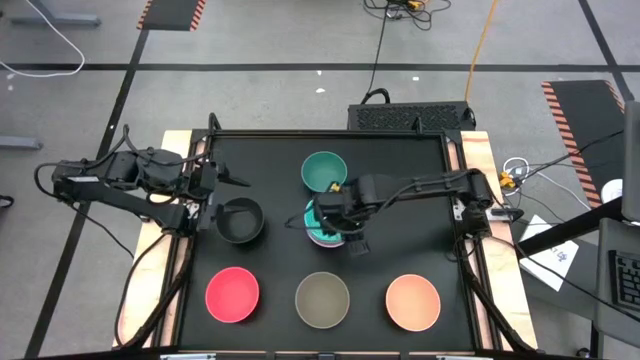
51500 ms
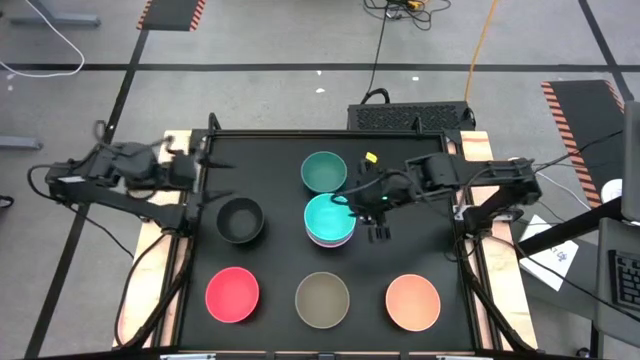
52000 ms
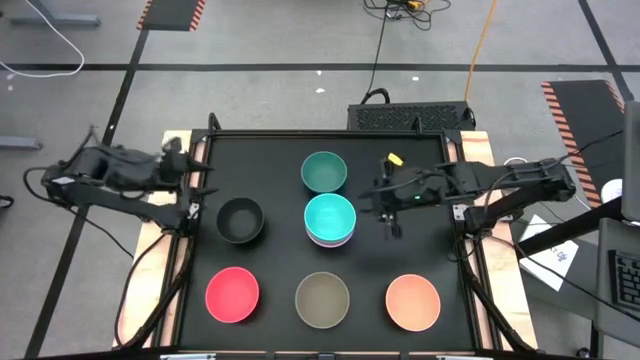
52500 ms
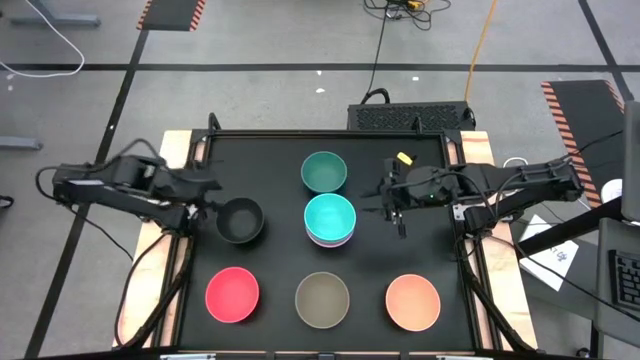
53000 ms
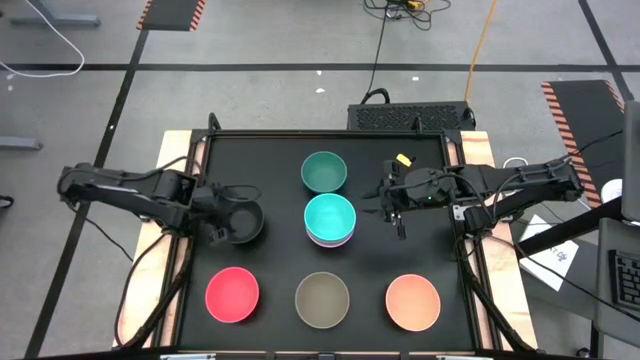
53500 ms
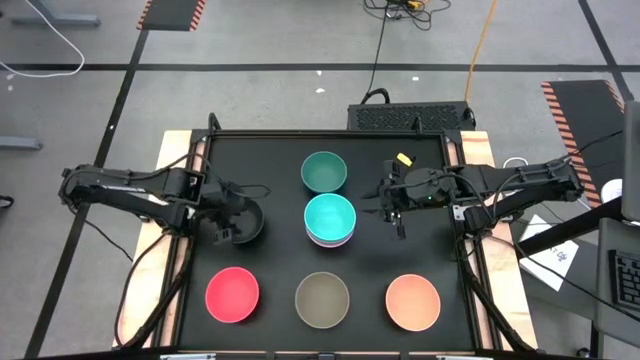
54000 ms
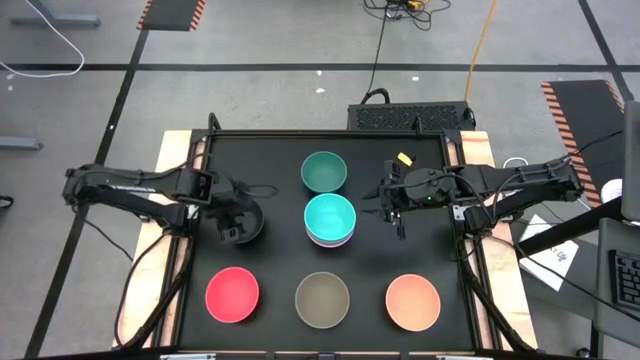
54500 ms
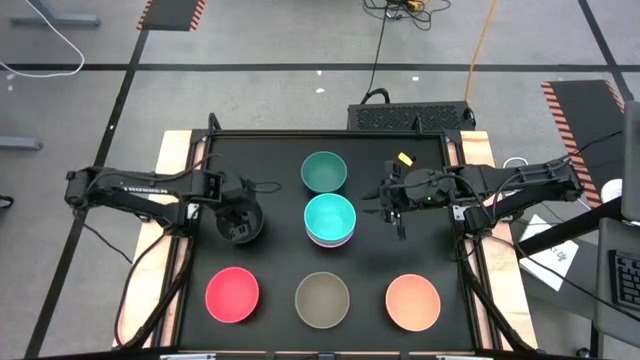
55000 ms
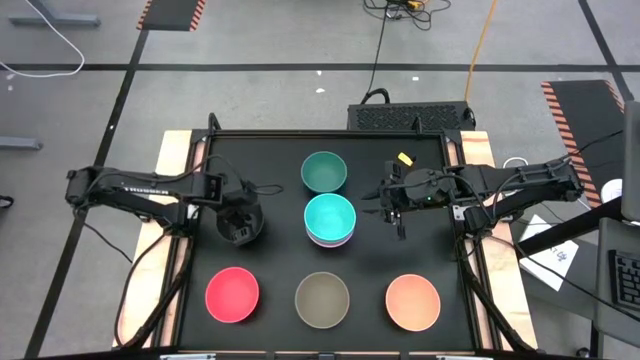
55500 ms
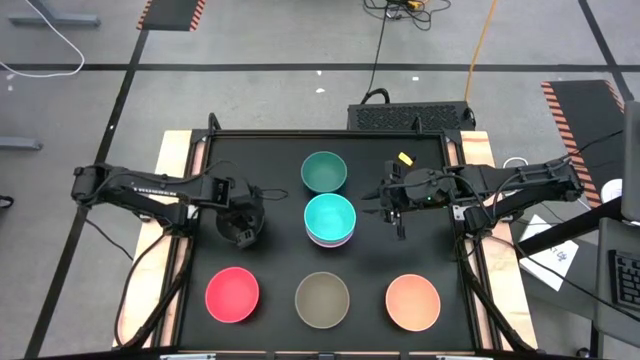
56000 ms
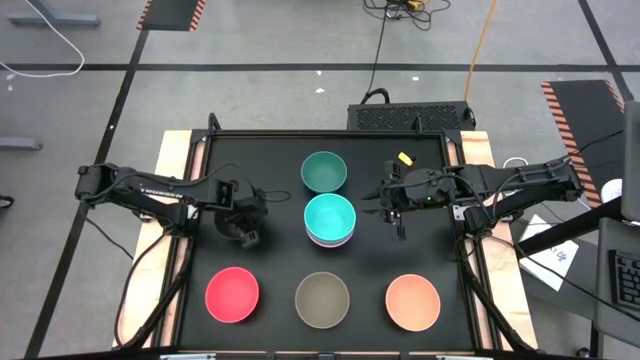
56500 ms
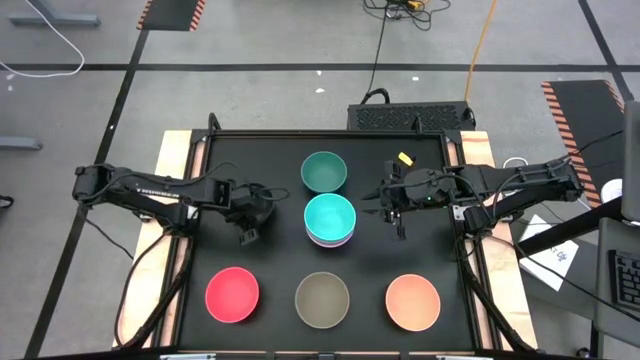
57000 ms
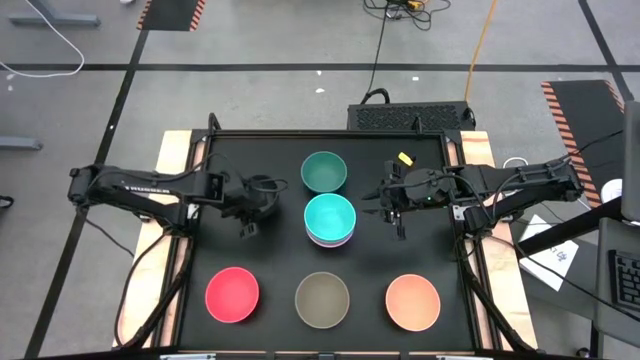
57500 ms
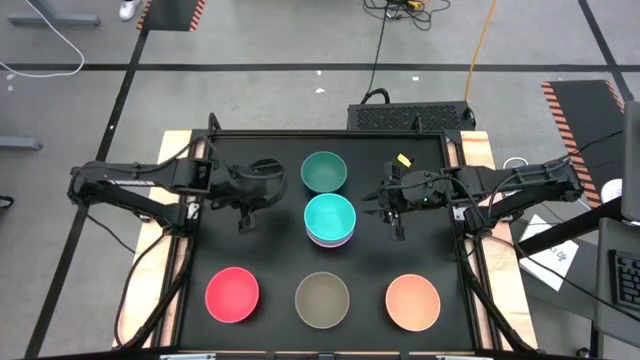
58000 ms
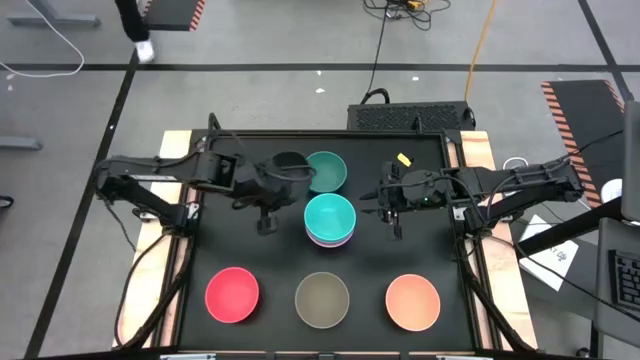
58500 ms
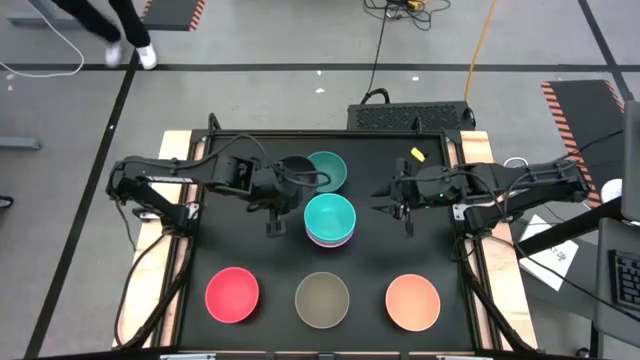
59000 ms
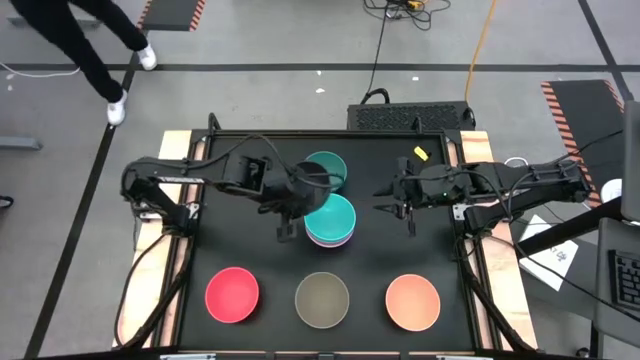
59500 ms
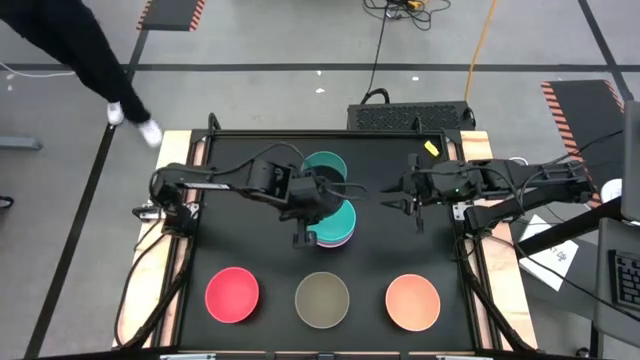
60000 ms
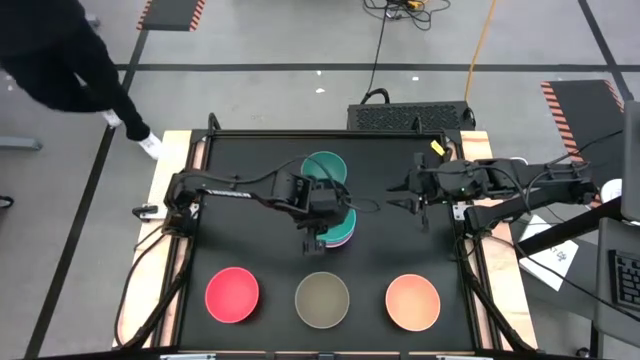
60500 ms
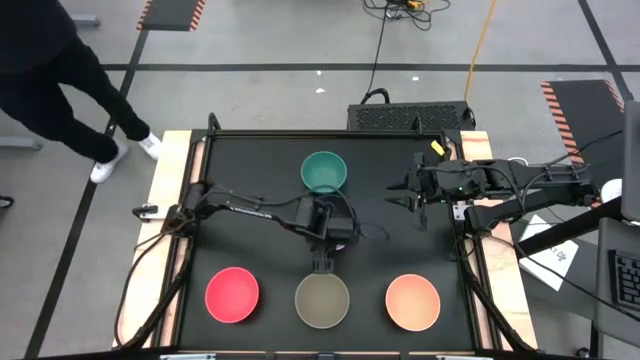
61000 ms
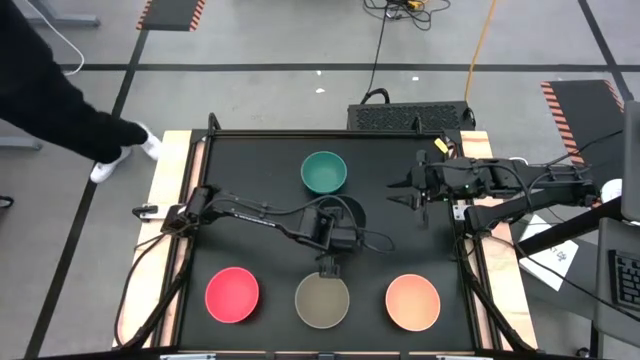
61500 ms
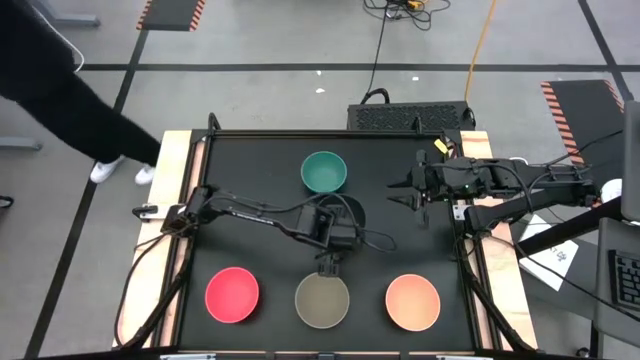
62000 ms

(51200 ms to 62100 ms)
Task: Nest bowls inside each other
Stack the black bowl on top of the light green bowl

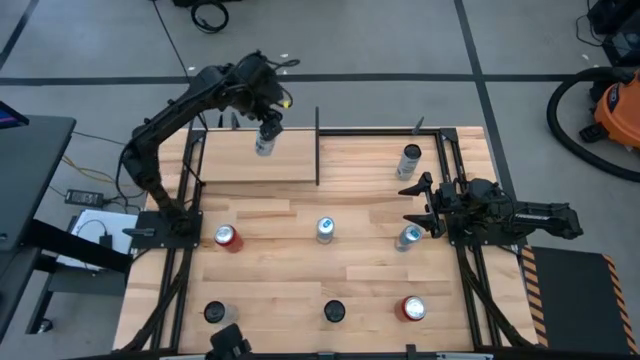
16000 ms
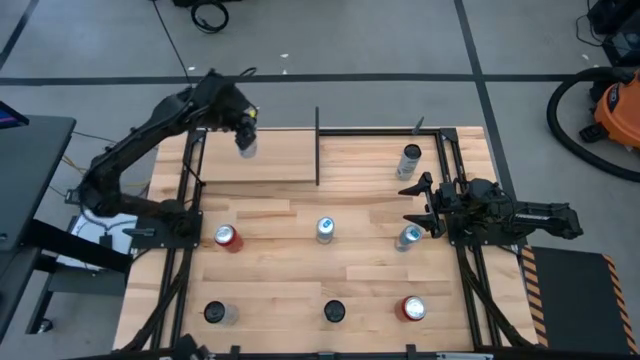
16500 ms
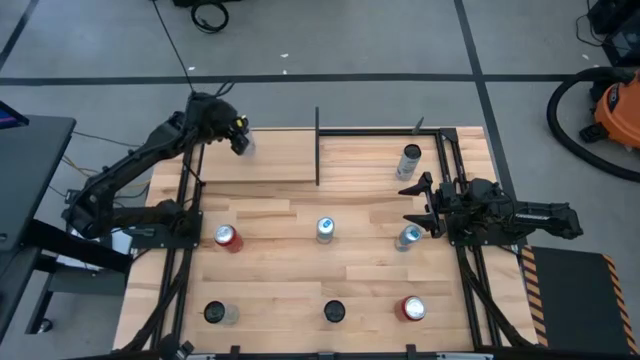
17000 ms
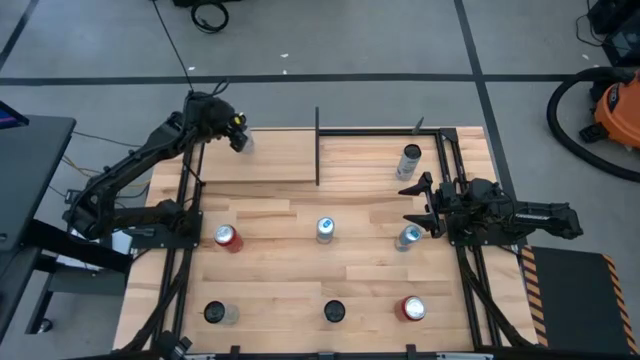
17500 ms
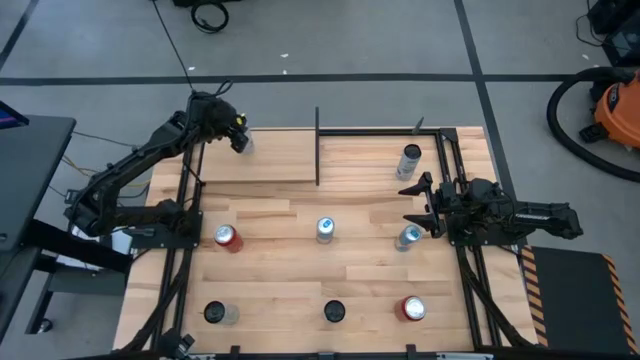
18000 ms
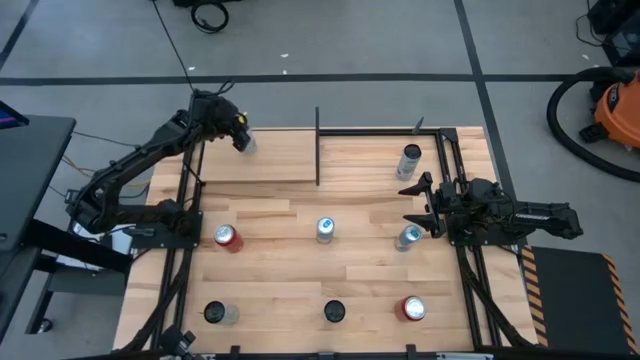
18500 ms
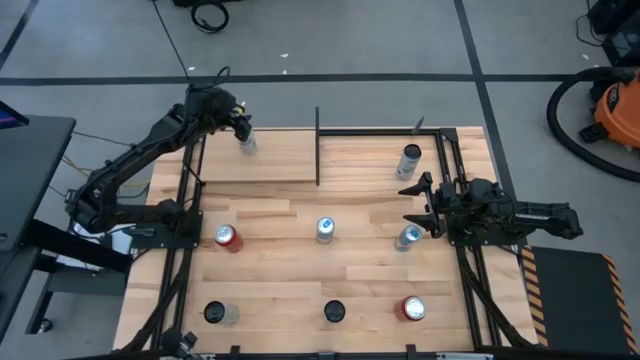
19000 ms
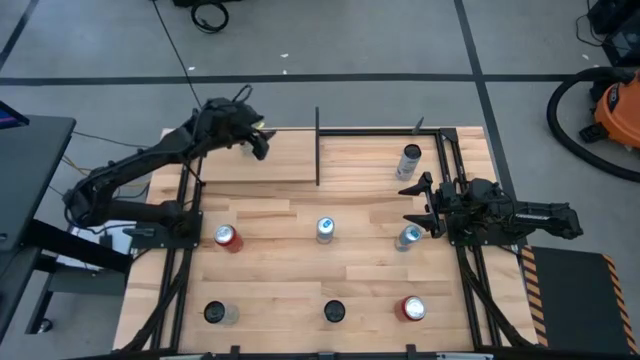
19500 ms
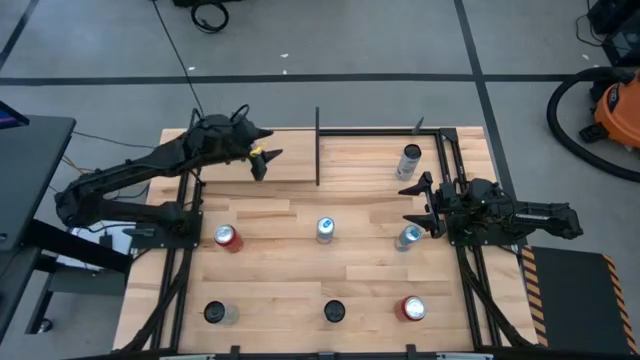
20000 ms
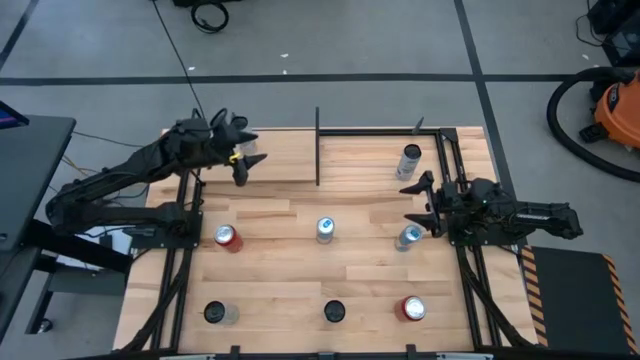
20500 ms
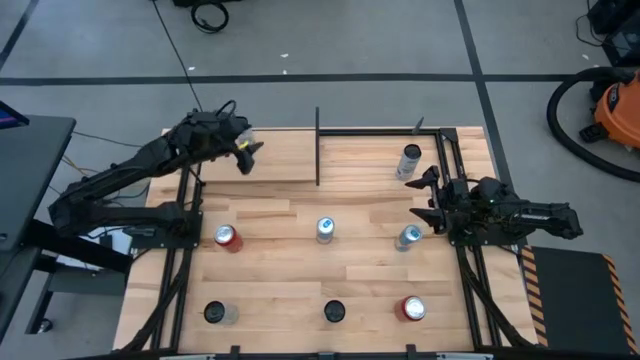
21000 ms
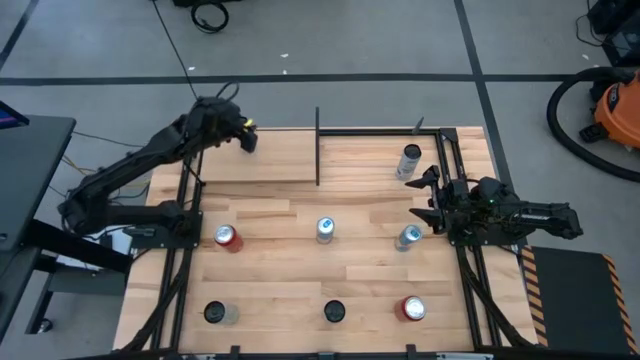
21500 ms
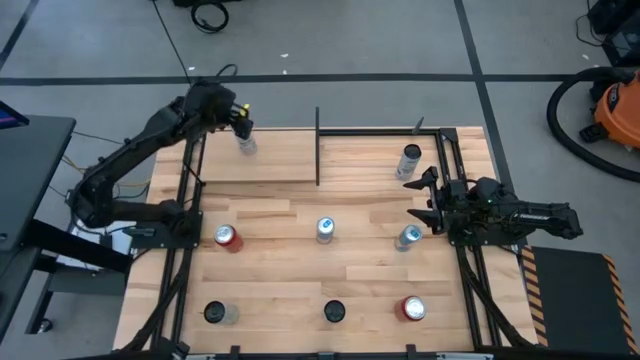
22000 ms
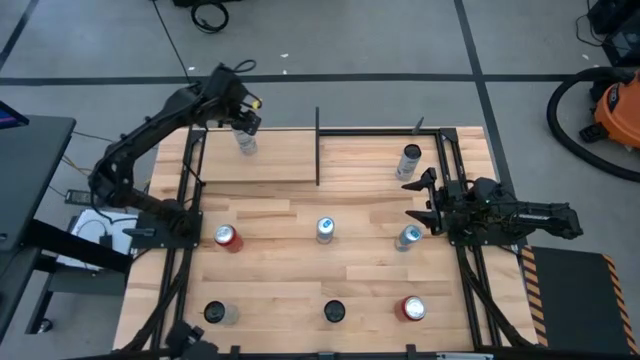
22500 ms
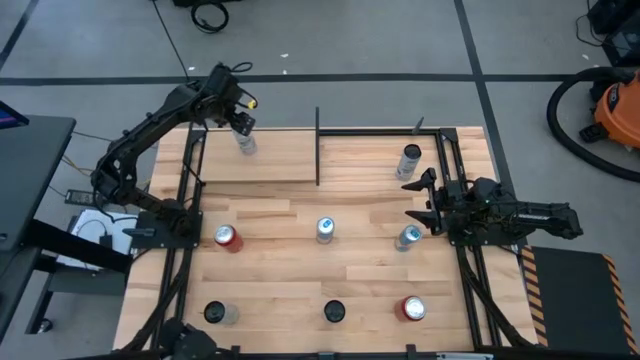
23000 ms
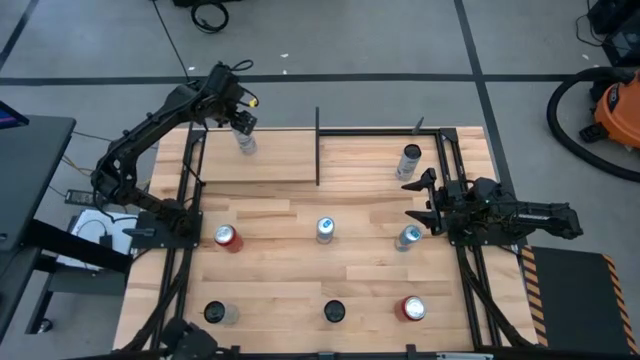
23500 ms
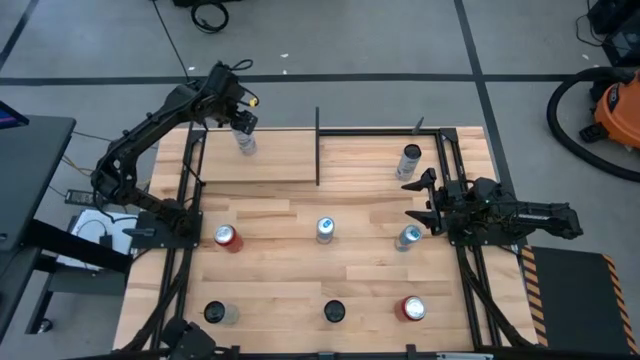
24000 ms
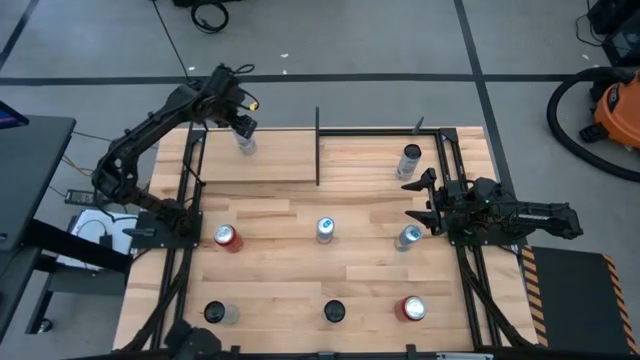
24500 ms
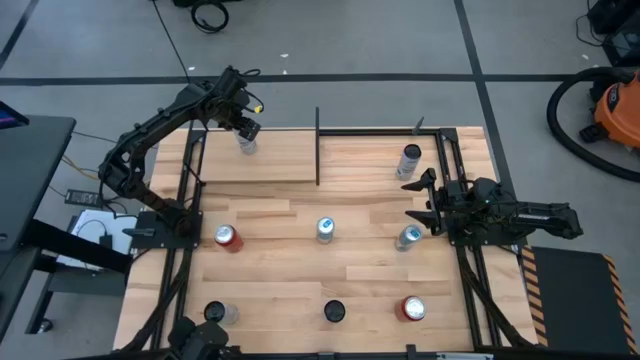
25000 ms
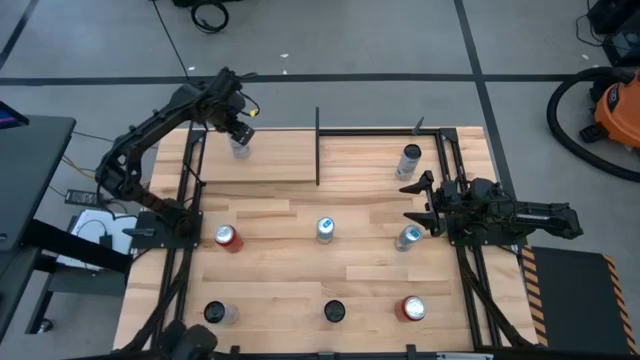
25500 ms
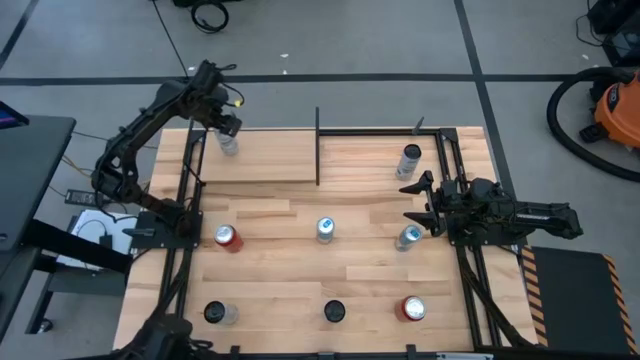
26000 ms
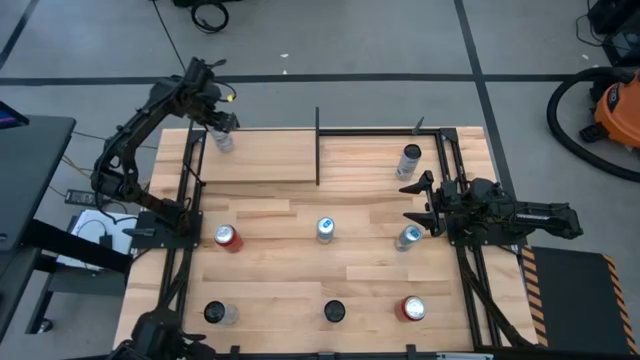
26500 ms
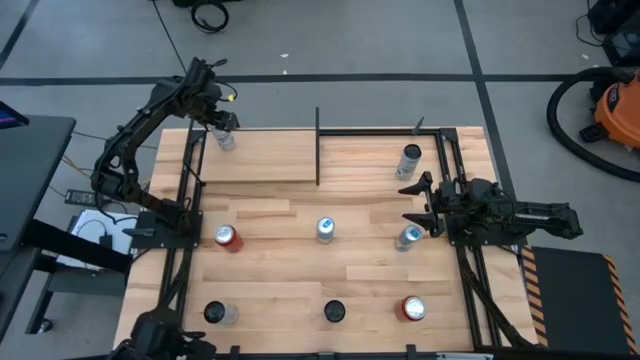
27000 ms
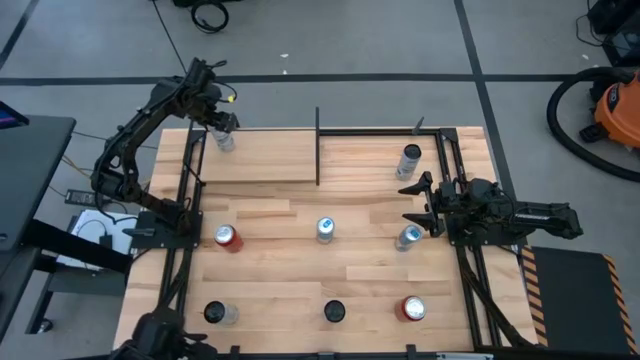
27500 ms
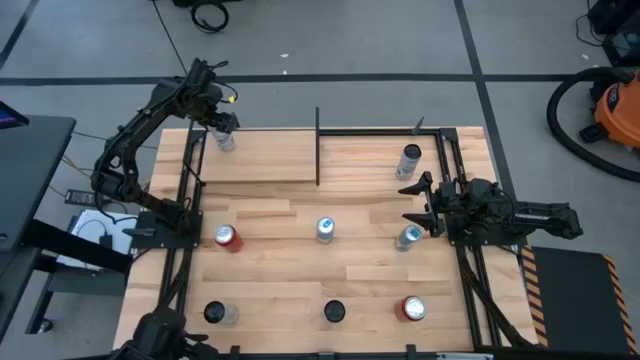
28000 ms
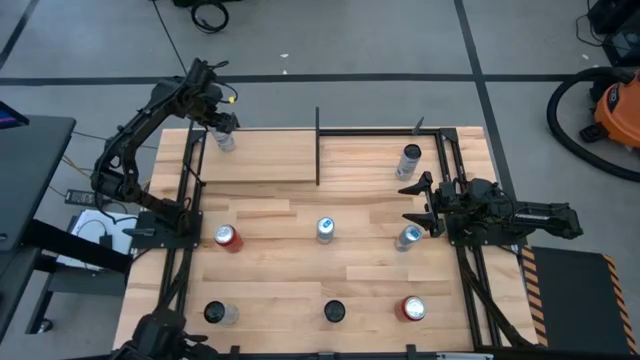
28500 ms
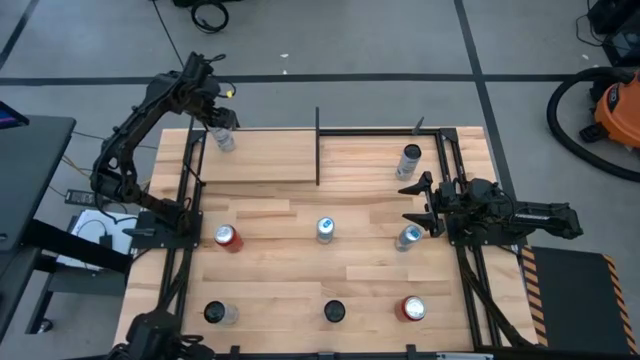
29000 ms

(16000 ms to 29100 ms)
Task: Place canned beverage on shelf
Put the blue-white soda can on the shelf
